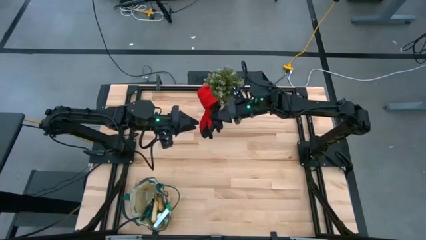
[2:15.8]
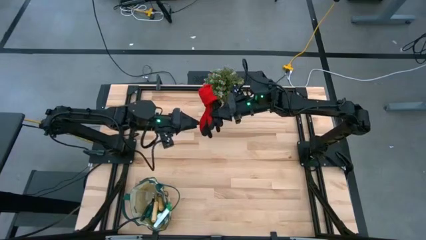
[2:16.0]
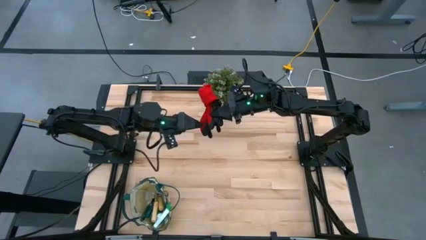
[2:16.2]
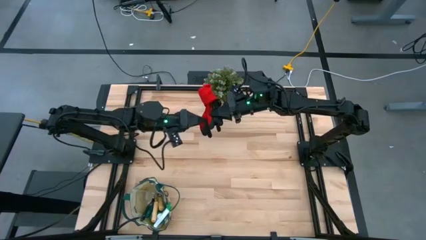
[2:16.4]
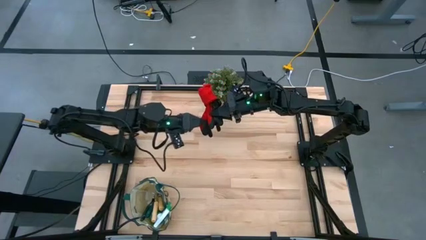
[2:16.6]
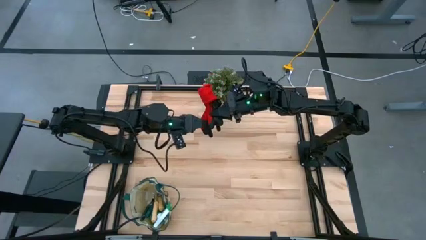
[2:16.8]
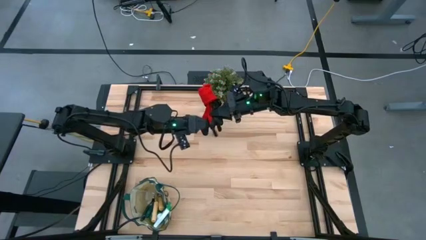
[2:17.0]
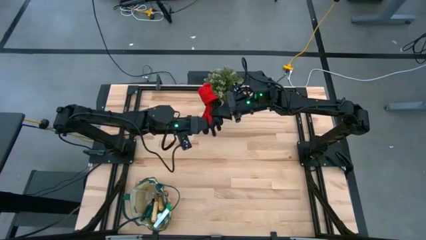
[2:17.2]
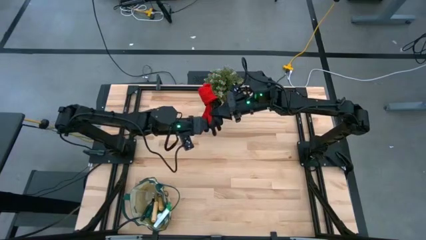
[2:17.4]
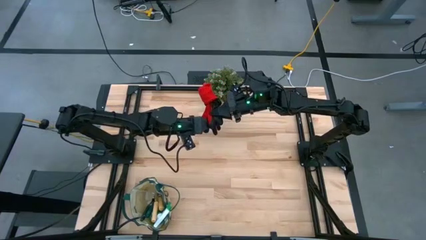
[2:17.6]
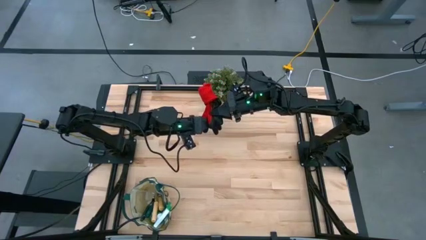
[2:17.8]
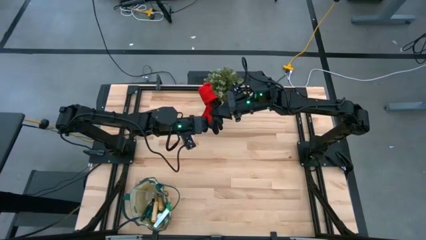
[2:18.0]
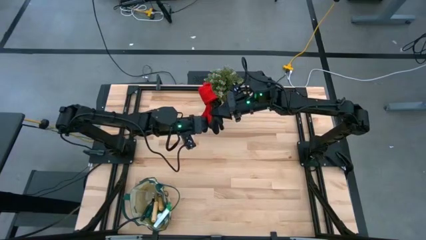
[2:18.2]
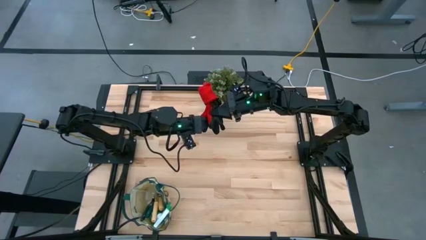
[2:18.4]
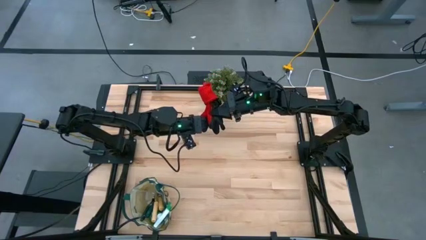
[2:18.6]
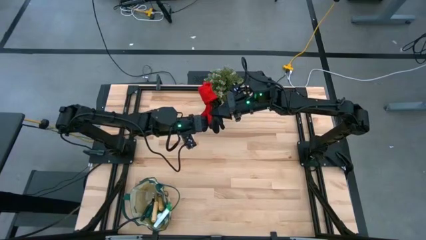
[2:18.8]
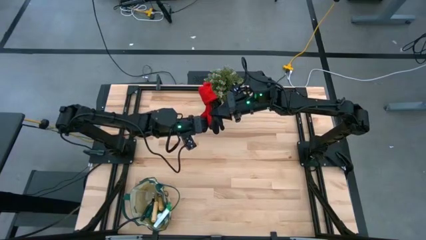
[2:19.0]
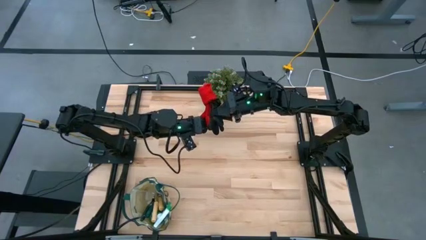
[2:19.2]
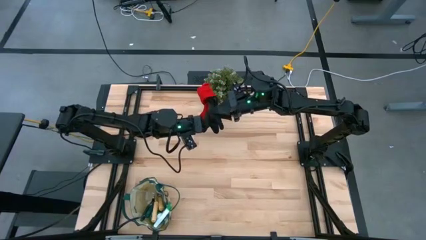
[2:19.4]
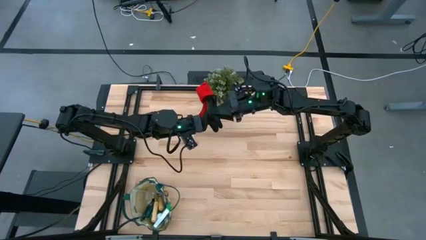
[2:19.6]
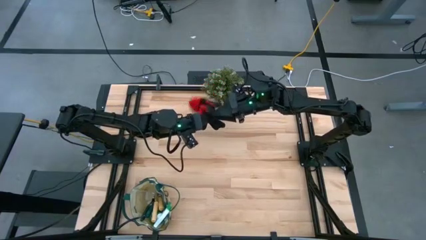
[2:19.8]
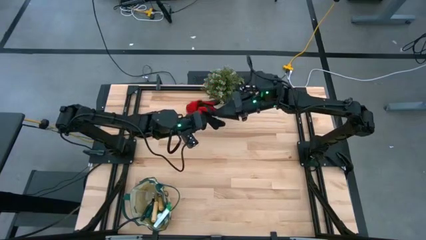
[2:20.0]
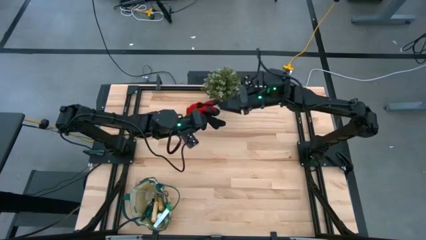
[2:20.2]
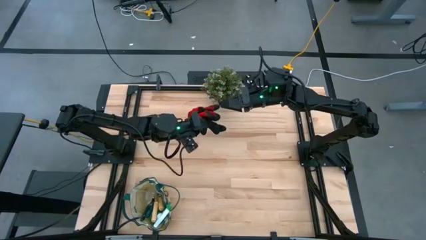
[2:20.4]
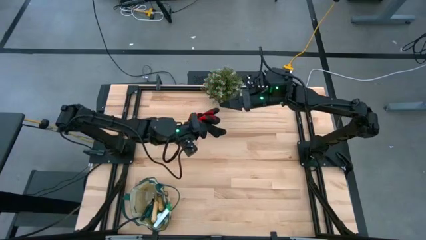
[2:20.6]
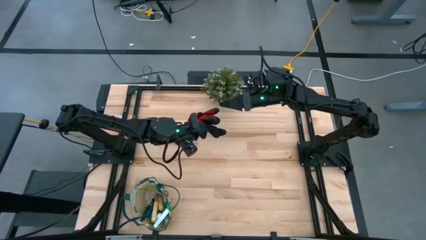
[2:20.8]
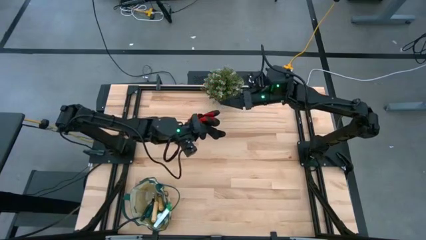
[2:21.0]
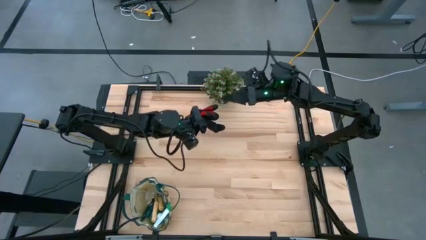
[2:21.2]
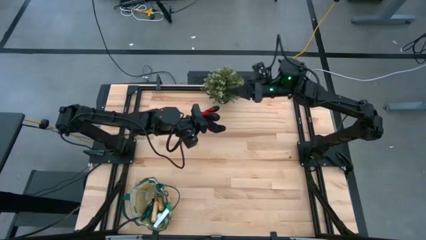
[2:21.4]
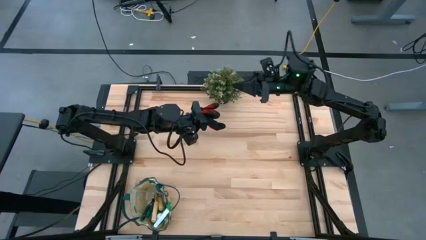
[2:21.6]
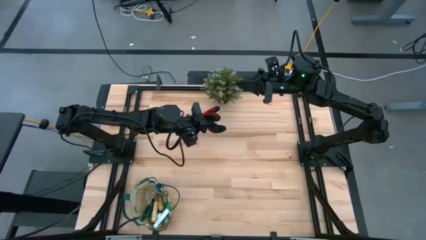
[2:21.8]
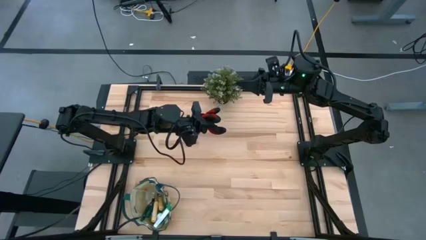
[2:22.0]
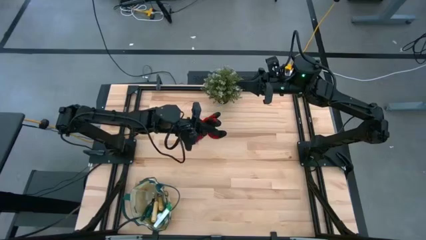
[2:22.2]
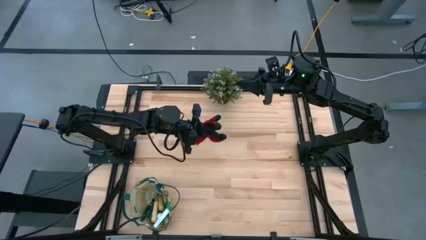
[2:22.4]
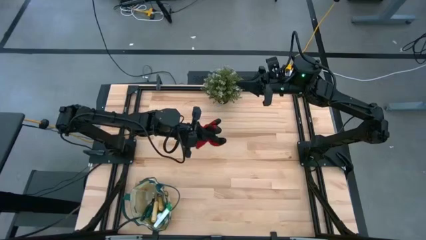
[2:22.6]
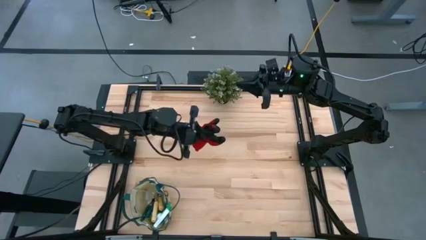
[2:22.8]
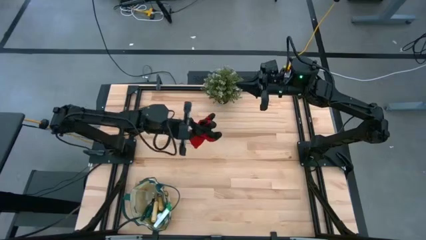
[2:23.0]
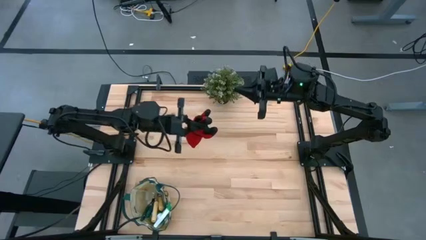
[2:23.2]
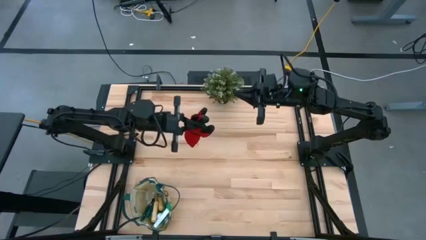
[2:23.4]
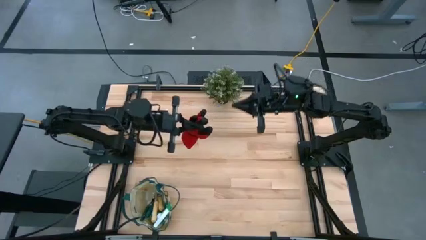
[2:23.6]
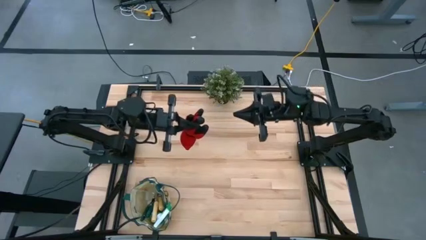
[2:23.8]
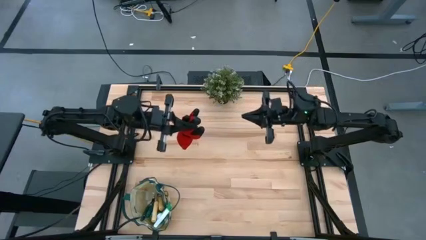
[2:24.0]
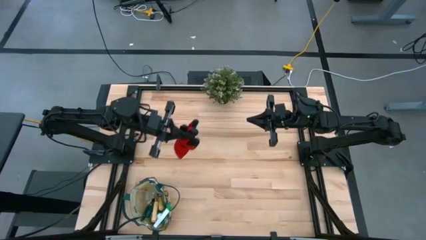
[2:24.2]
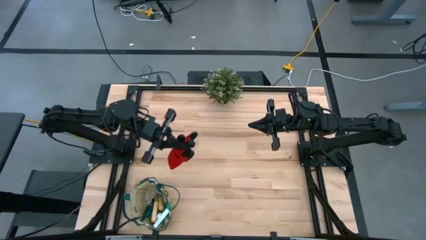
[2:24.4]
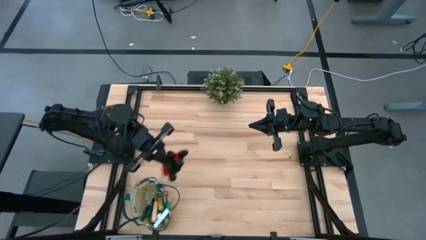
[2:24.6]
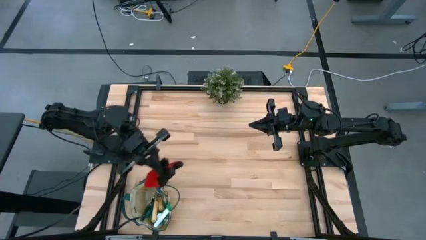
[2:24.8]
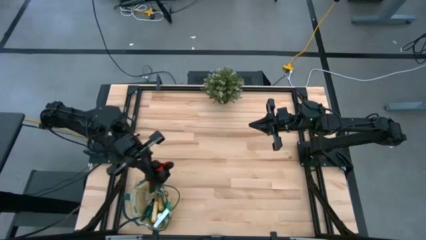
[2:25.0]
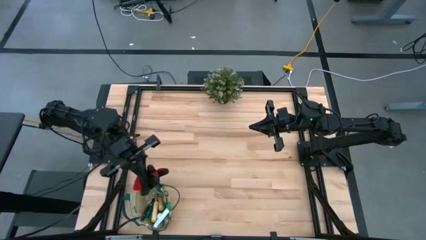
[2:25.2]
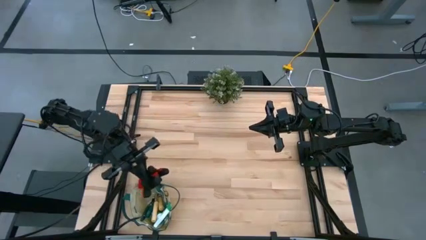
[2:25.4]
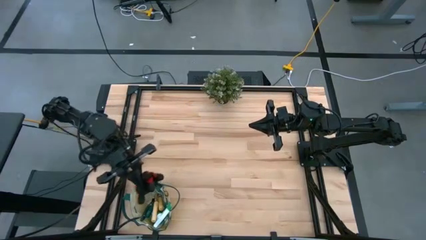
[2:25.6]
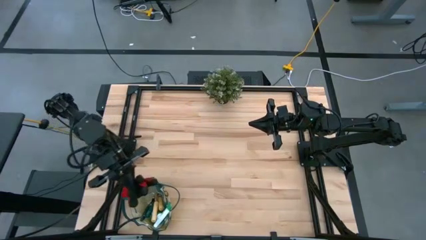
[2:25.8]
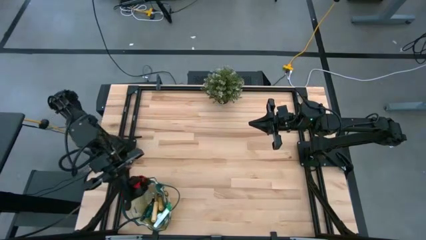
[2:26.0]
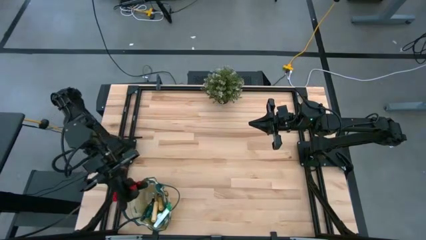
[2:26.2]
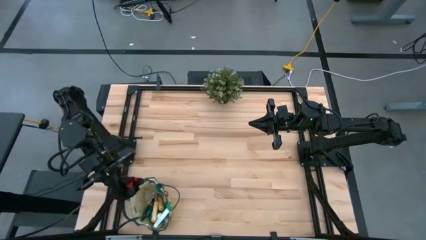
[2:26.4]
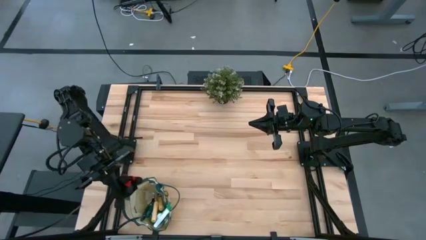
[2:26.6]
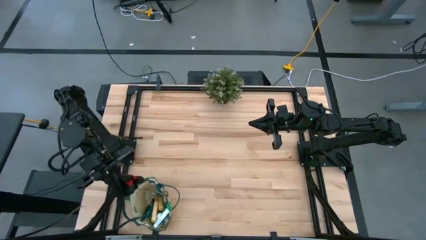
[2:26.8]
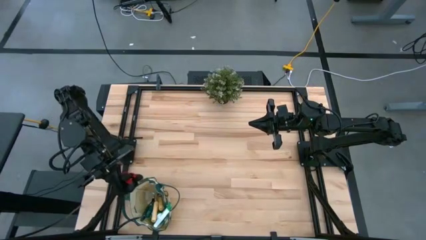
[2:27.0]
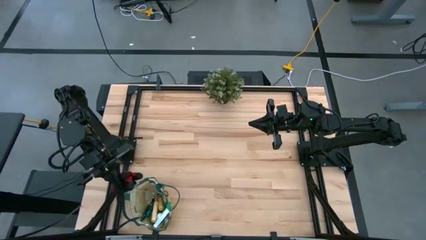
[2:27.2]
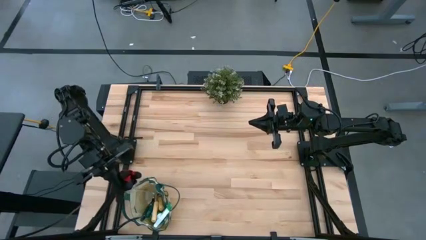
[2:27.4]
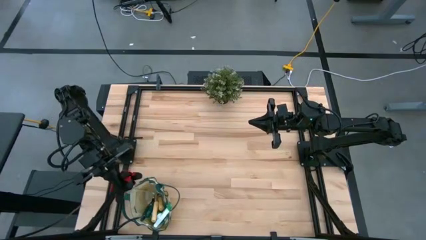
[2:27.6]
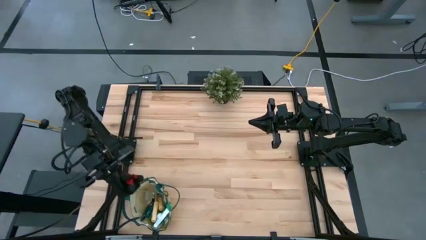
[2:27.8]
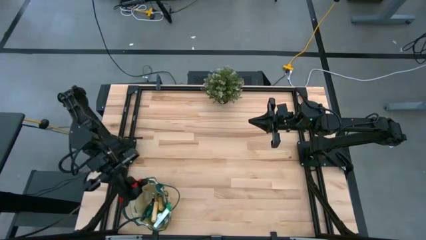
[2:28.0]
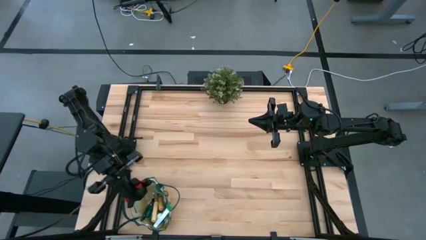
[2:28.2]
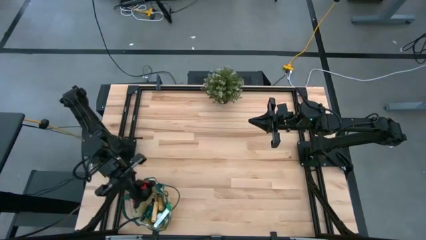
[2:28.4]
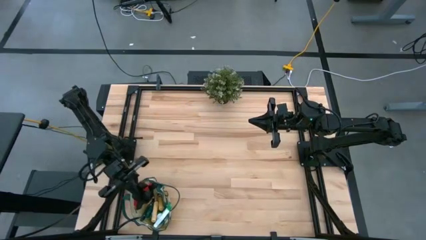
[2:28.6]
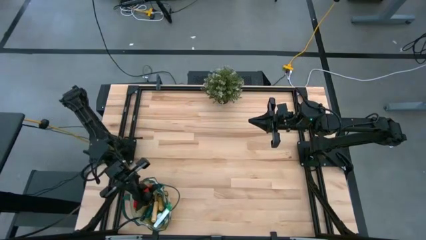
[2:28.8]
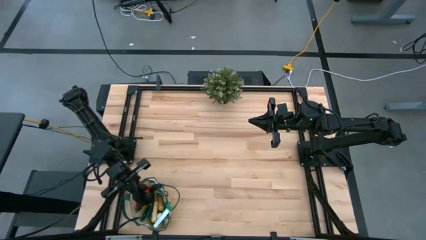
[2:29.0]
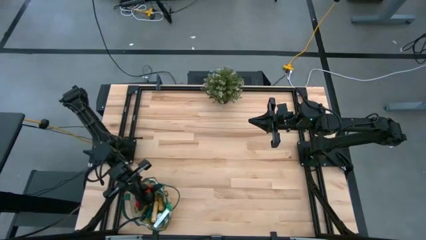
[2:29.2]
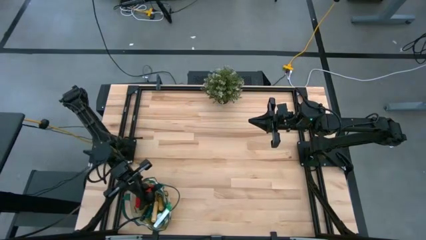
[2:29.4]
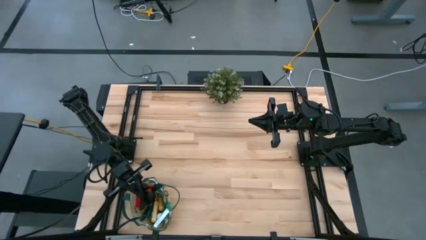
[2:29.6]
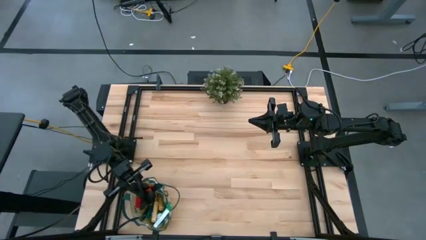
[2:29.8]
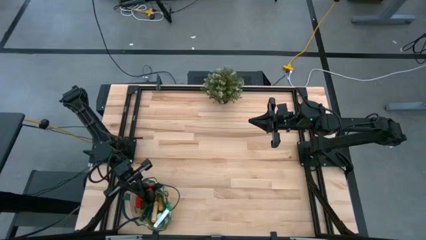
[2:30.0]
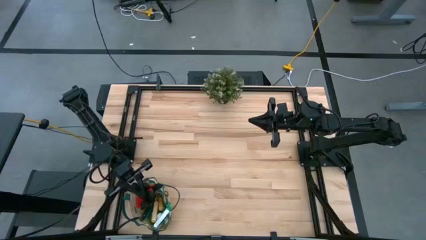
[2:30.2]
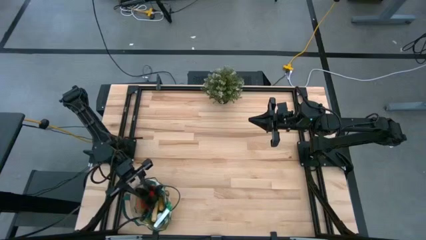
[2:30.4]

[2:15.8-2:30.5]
Task: Pick & Place Garden tools in Gardening bag
Put the red gloves into the gardening bag

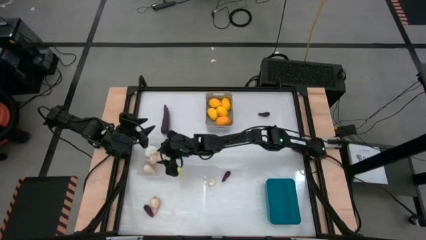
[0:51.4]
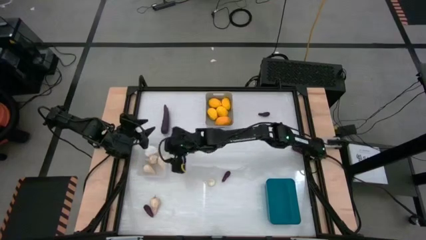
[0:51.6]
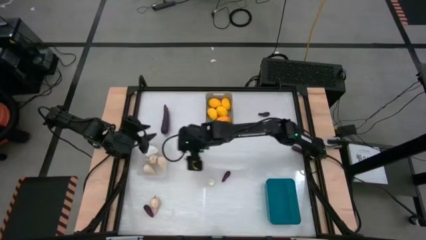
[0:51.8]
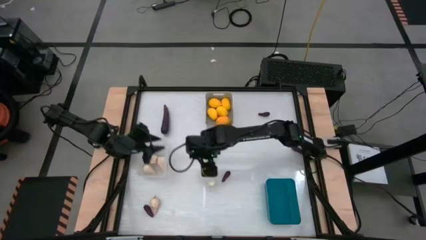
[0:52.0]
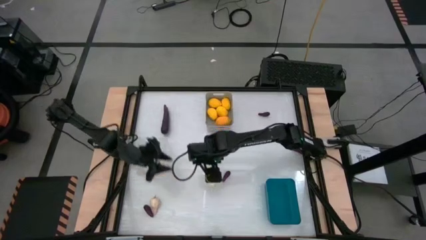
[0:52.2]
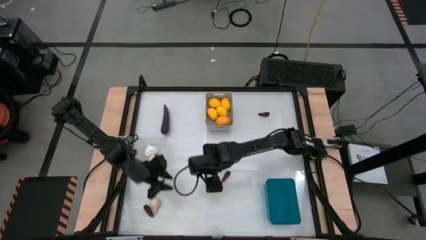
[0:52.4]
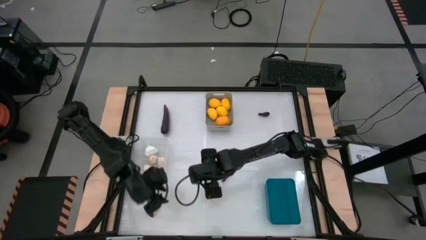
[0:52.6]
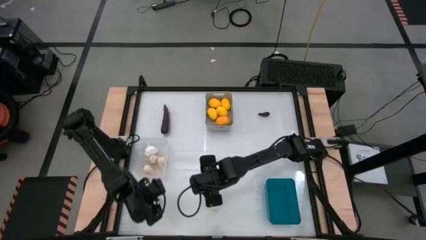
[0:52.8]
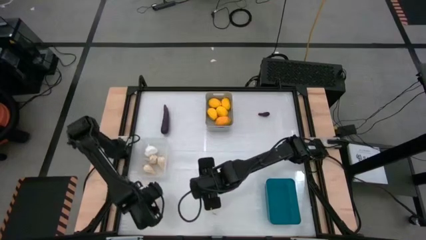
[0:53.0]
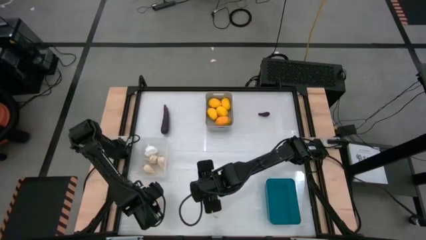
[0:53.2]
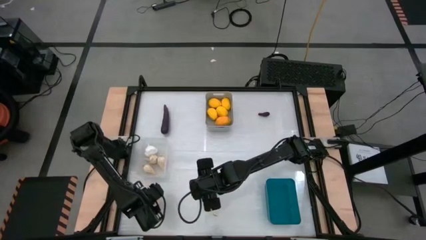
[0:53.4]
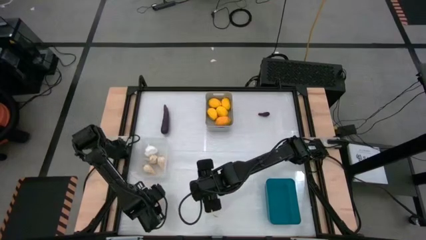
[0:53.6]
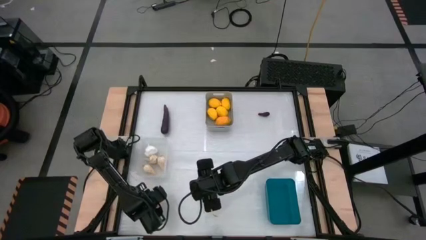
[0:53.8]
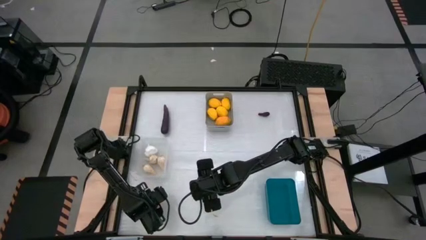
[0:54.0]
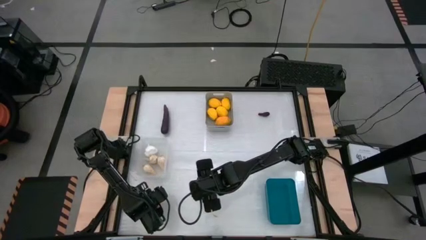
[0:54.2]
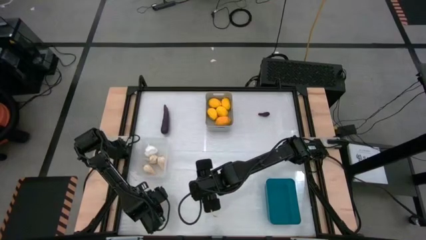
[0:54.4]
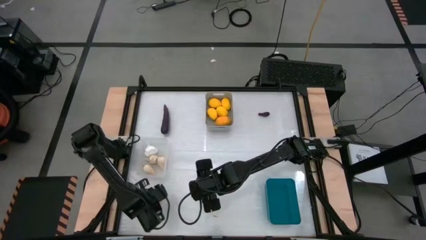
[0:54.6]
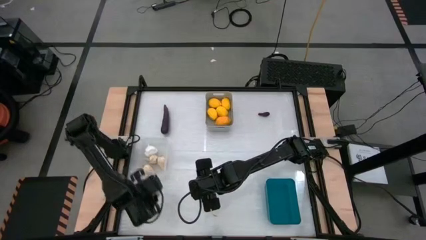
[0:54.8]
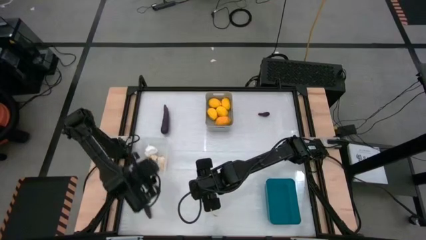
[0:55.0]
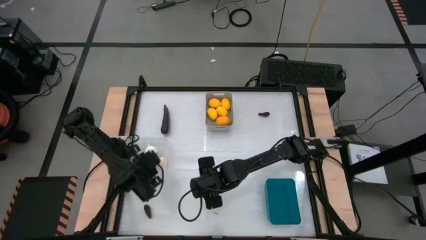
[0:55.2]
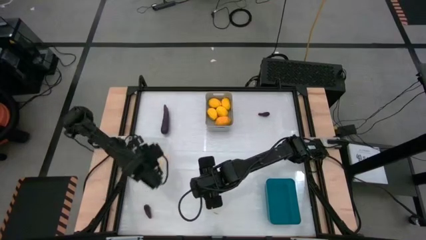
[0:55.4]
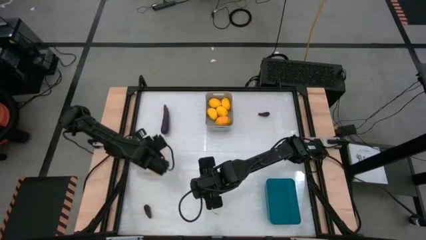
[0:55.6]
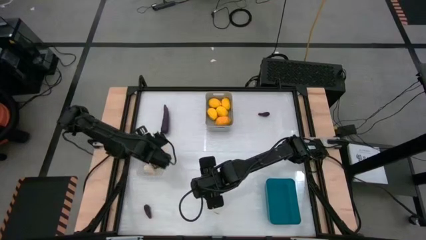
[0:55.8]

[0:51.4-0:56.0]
Task: Sort produce into baskets
Put the garlic into the transparent bin
